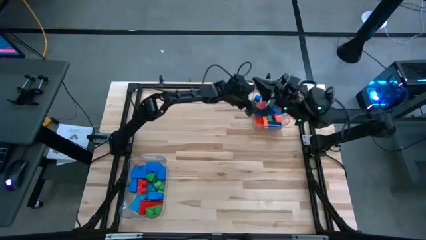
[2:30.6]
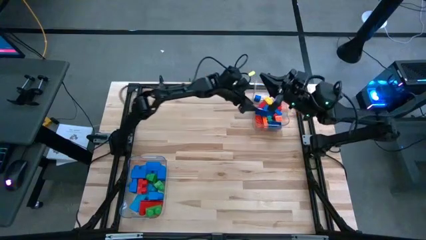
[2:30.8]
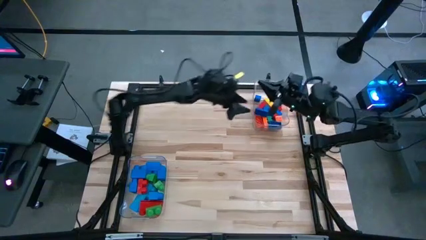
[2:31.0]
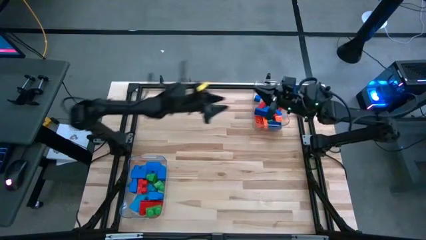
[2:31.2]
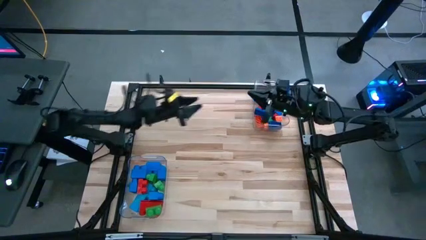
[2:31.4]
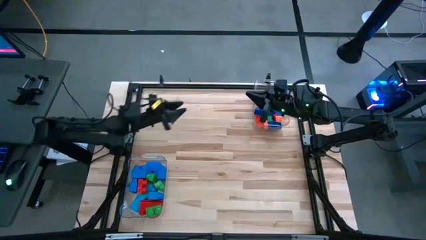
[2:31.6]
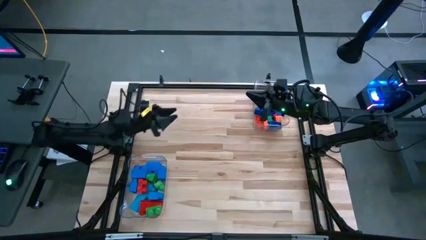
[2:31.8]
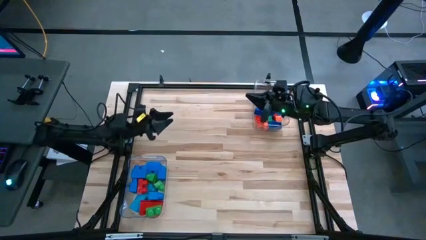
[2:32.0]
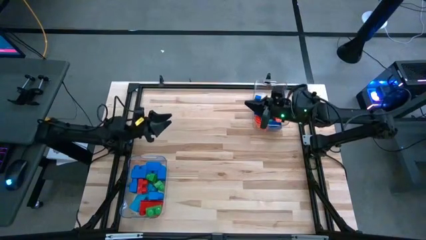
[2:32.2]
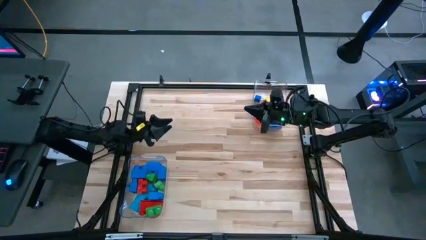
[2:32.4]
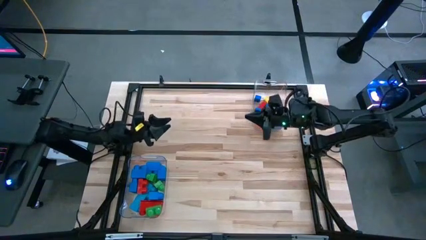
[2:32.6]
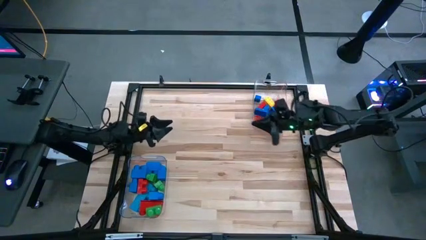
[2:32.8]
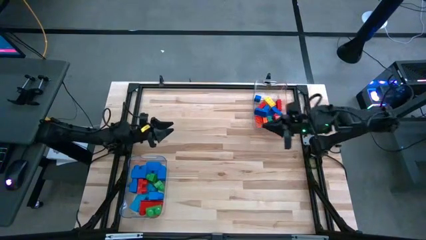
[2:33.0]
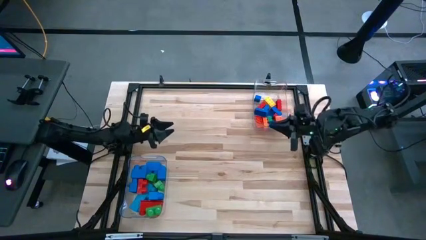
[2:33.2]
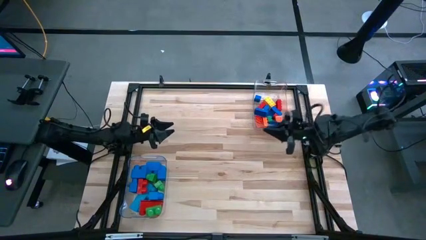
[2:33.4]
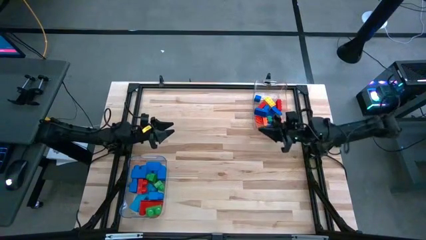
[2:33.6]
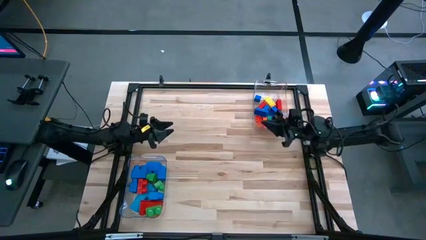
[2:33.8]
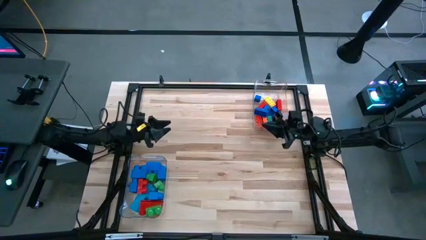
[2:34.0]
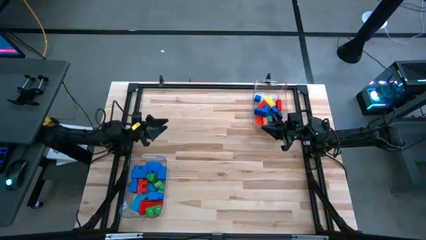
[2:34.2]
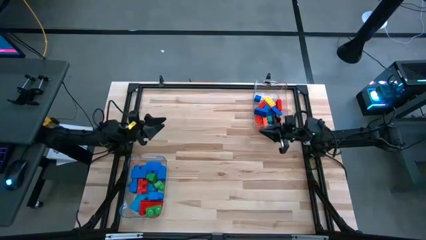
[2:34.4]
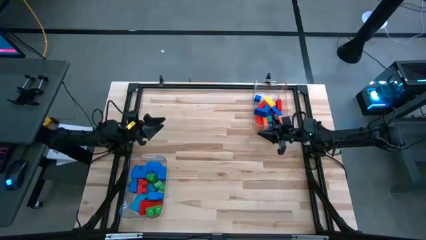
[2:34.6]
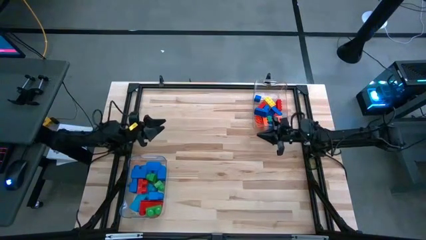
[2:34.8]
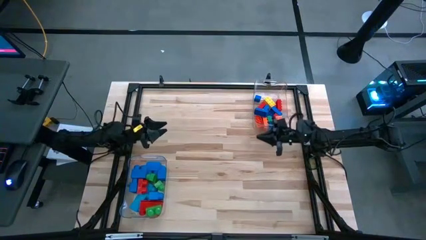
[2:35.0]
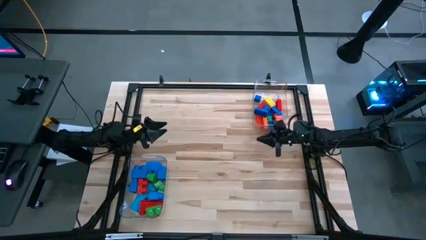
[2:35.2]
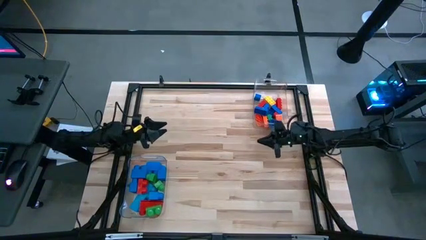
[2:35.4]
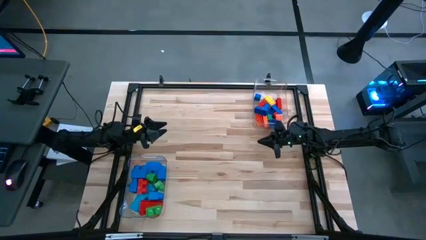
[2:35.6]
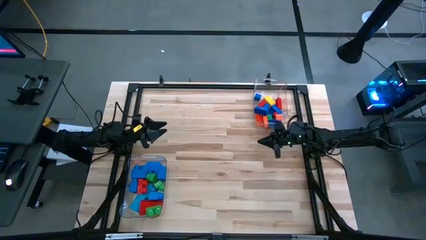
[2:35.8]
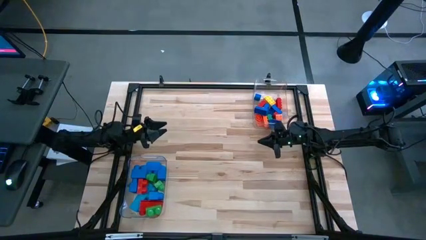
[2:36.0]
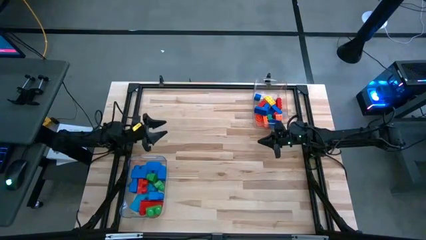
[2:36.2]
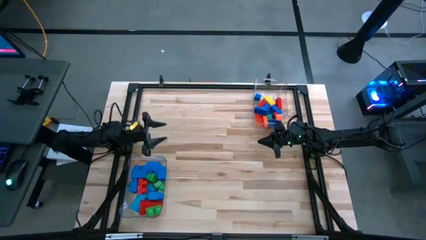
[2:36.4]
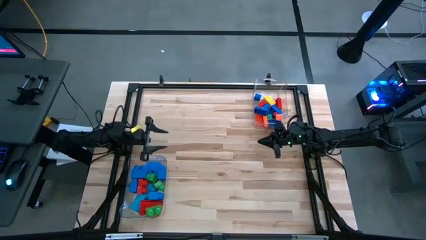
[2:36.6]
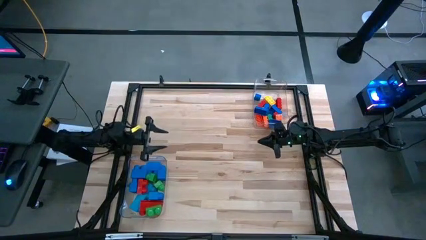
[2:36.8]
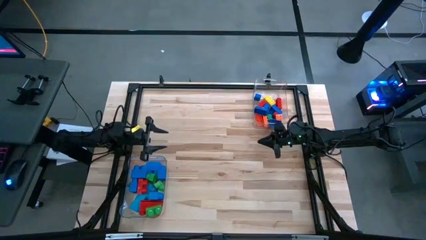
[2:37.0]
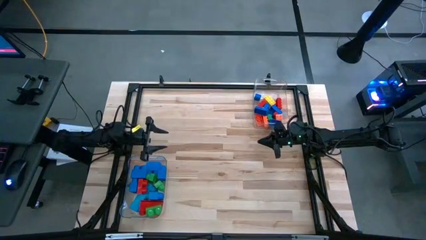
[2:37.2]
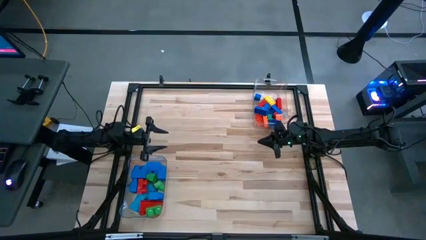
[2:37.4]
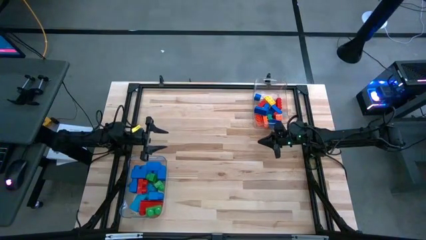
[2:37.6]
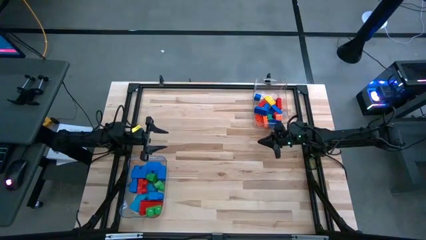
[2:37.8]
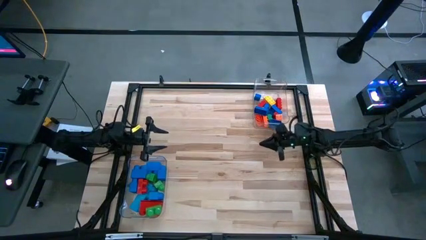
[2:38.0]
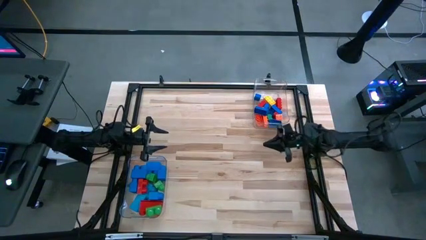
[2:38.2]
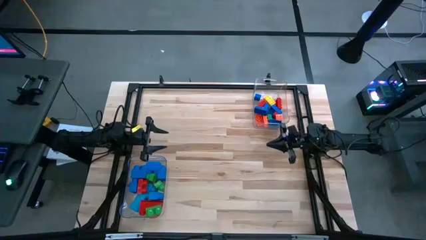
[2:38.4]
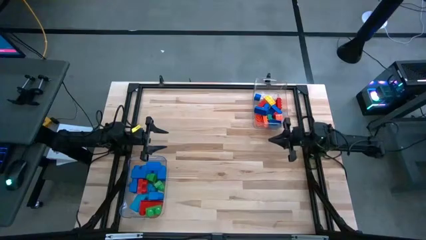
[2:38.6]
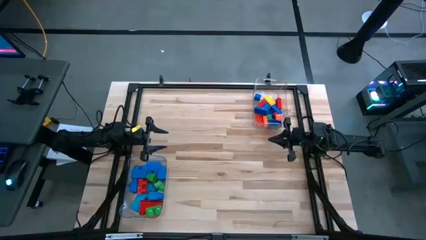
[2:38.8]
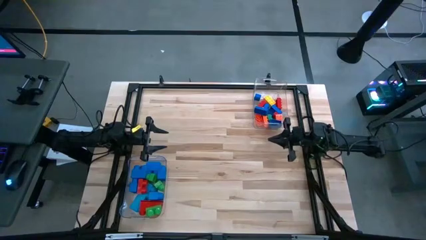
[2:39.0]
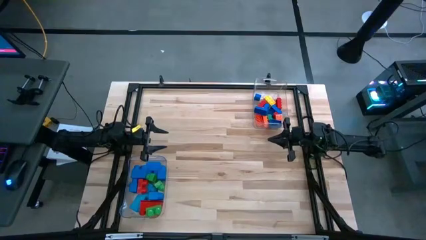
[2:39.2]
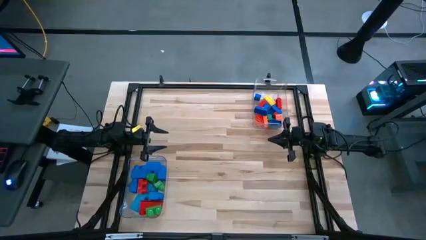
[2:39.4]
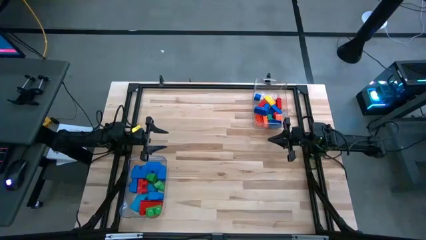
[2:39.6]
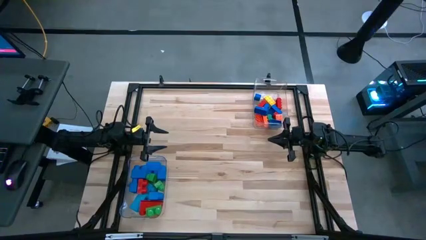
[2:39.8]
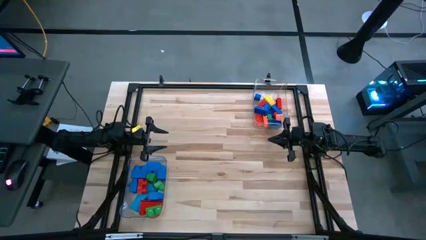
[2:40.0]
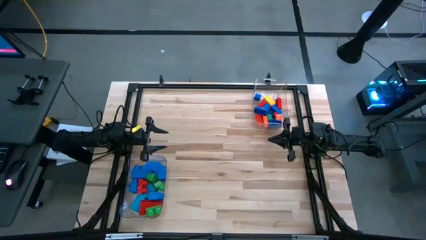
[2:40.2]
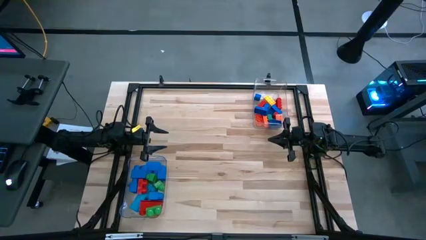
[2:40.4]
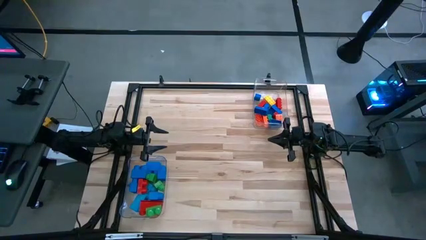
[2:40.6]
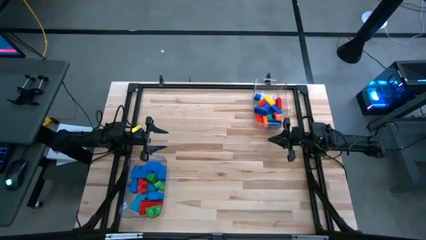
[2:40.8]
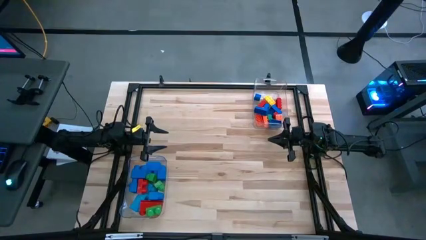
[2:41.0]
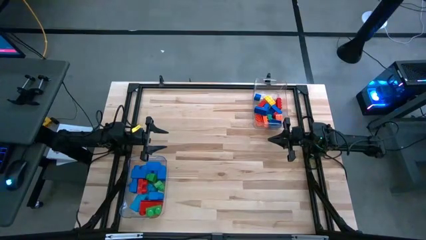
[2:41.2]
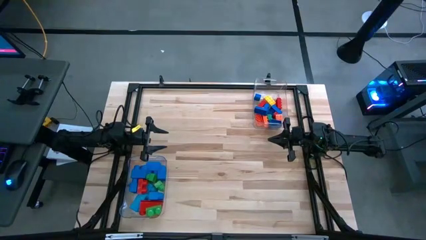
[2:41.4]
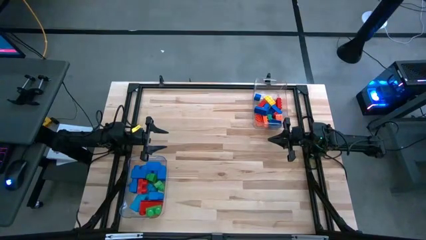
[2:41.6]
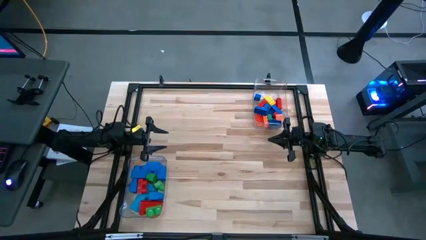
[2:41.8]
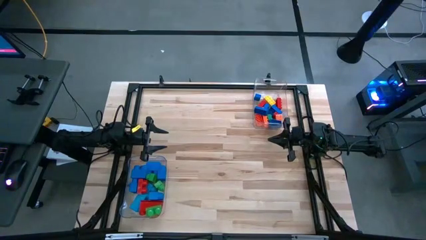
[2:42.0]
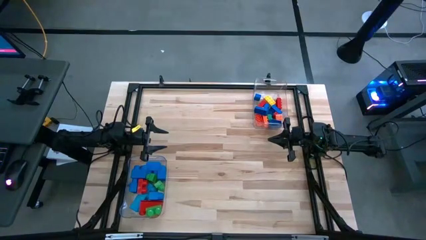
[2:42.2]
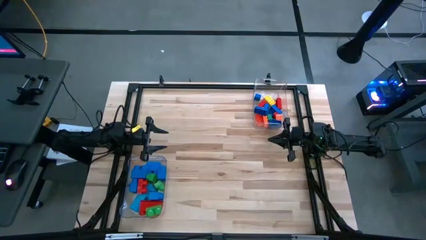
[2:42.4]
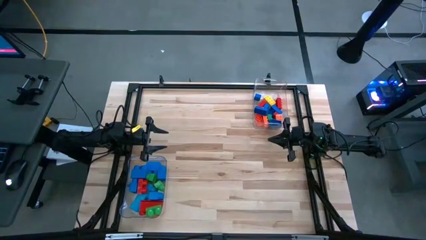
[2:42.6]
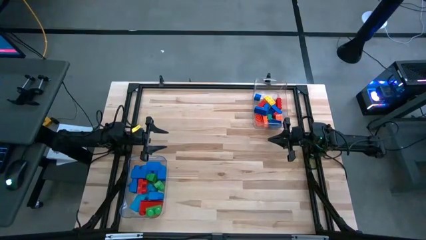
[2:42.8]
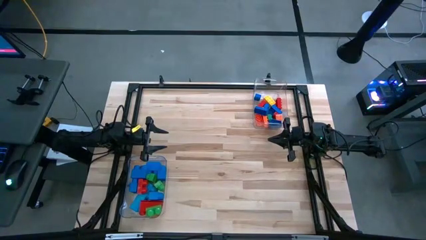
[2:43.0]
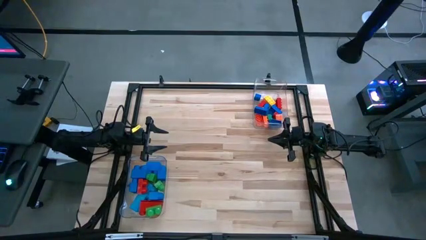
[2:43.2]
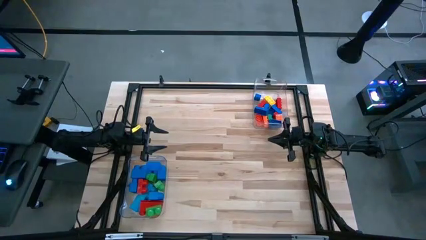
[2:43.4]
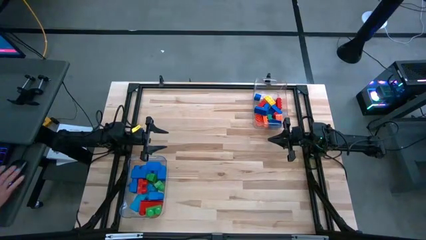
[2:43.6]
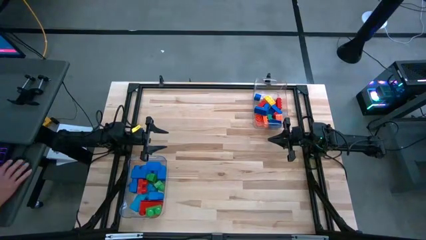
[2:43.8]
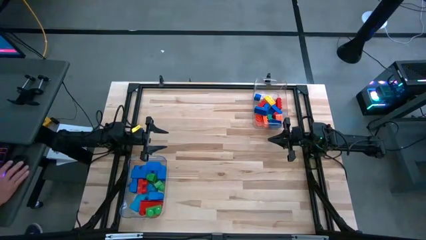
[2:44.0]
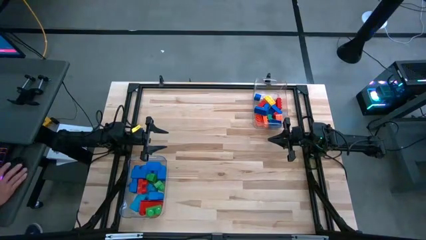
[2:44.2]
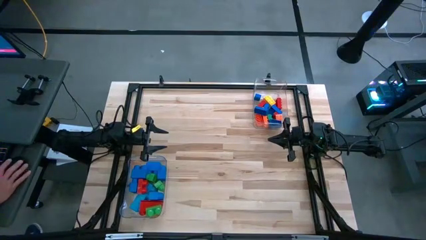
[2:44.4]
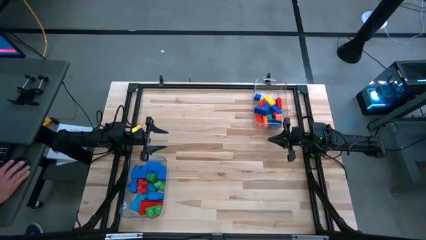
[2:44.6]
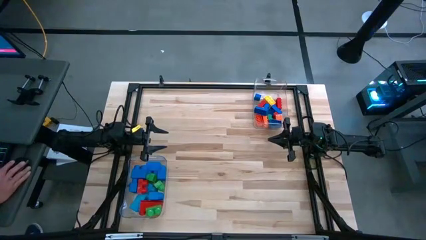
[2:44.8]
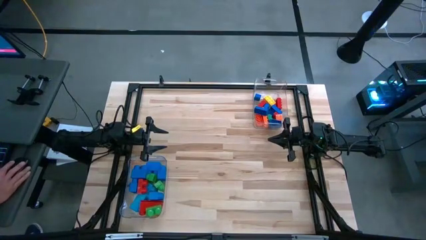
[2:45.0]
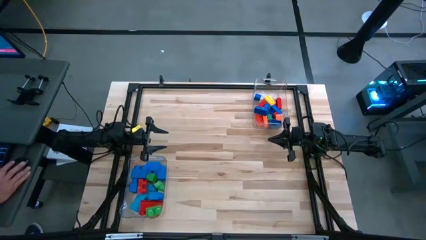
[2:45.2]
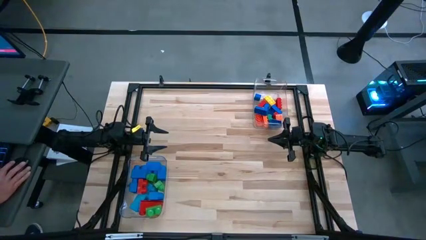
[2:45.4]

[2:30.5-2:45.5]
Task: Sort blocks by size
Return to Home Position

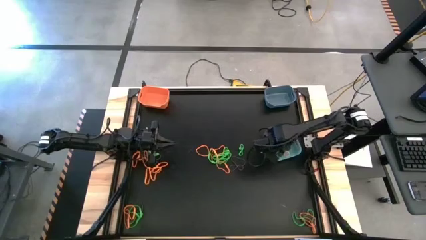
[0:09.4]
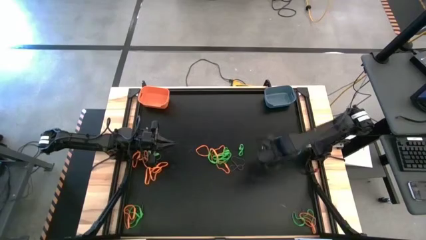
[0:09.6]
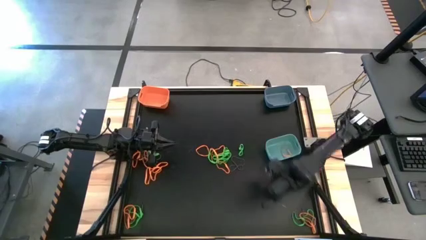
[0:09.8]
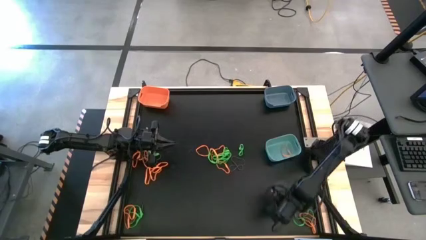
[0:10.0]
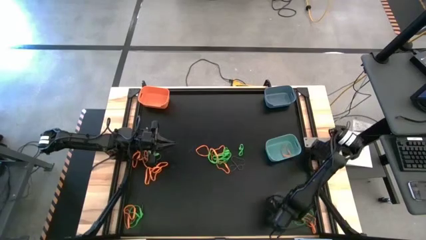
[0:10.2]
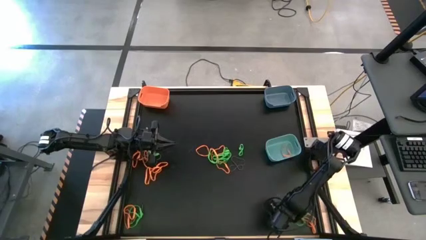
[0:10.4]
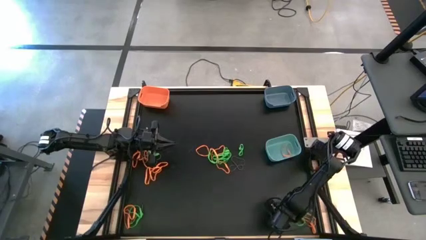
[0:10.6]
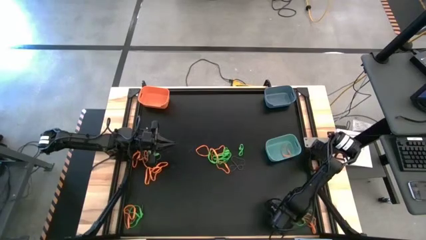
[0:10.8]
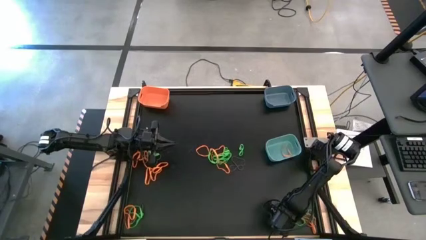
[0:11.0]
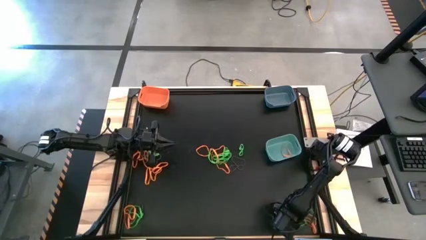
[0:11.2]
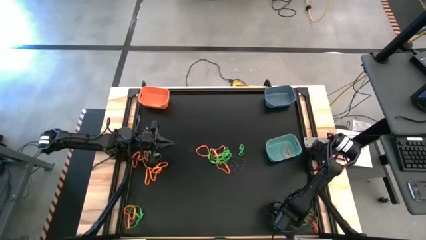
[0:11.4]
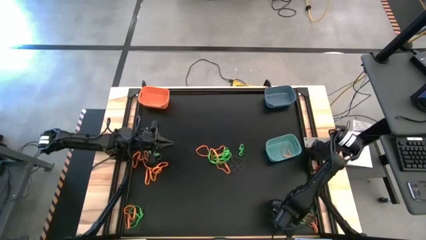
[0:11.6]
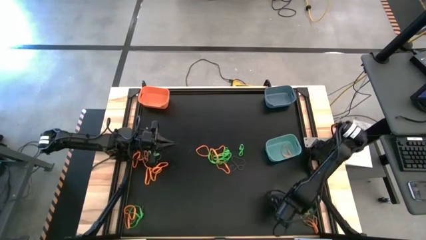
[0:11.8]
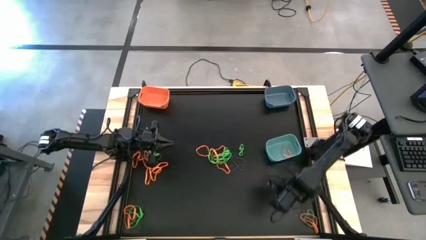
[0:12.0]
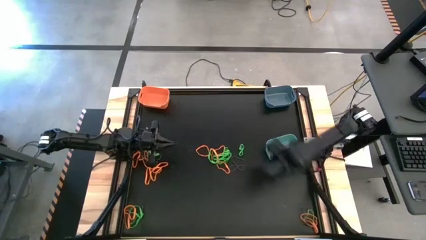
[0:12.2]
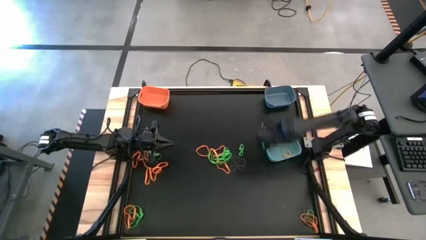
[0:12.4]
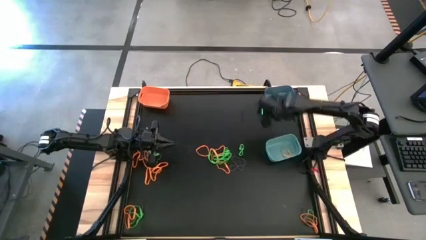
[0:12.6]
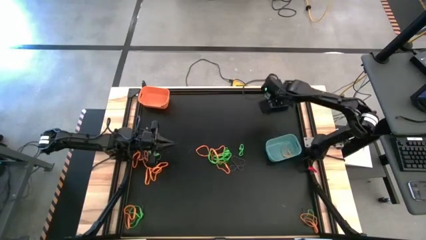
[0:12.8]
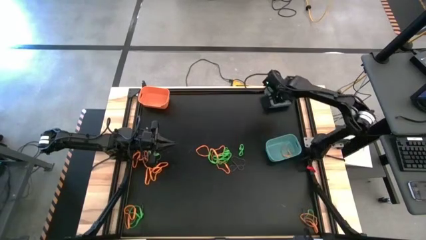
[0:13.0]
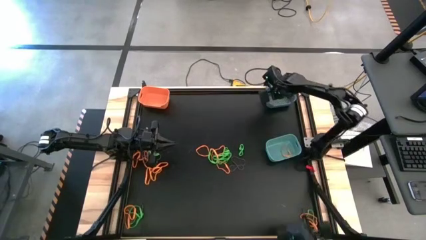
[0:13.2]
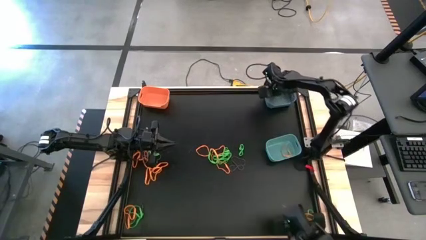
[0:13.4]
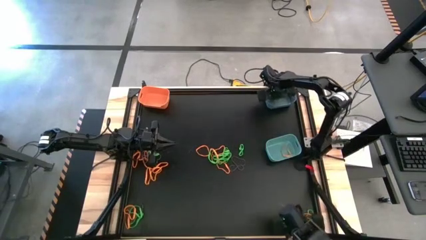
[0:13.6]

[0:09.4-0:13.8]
Task: Sort rubber bands into baskets
Put the green rubber band into the blue bin
